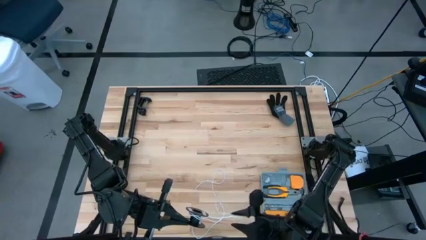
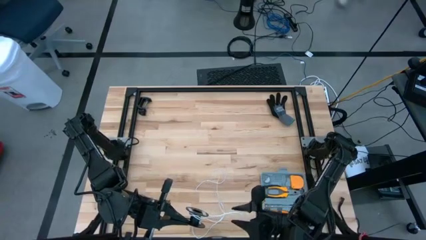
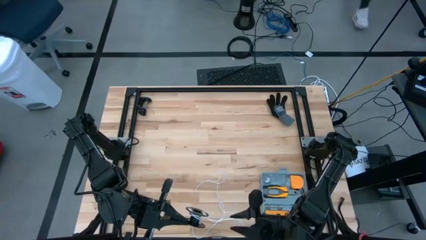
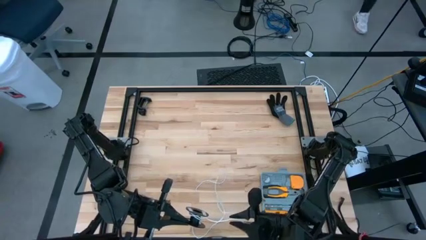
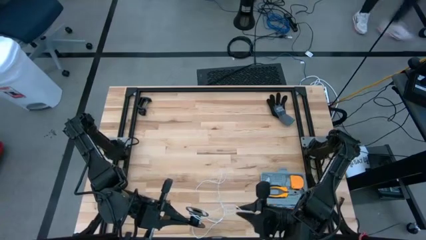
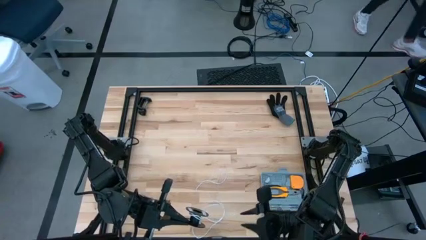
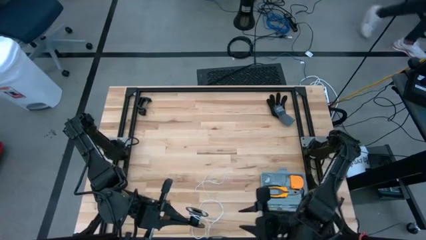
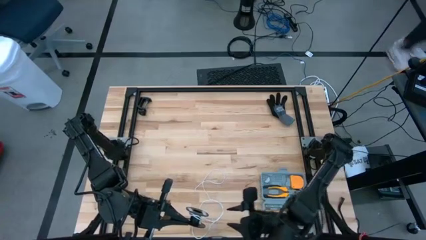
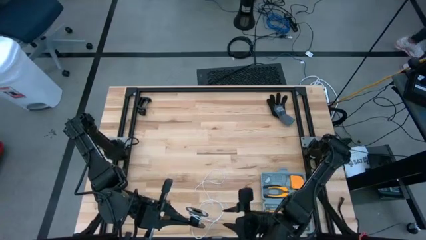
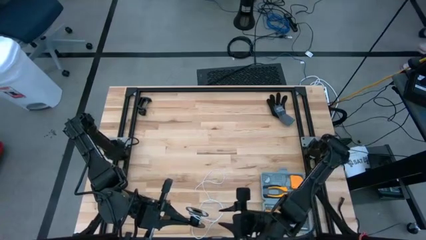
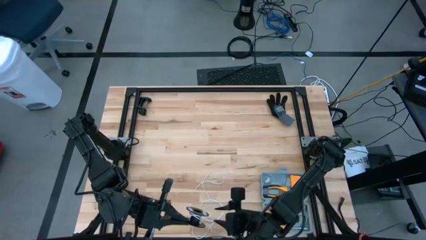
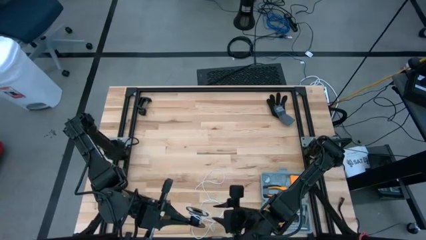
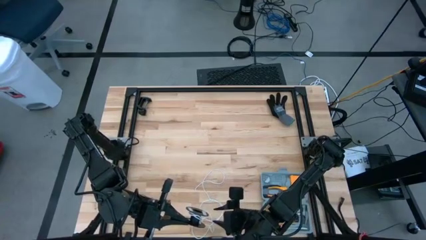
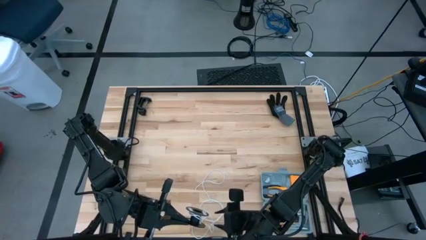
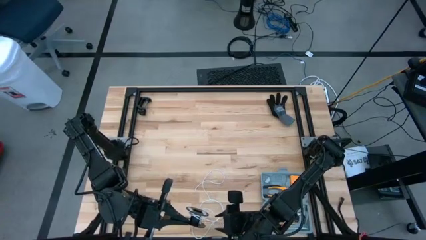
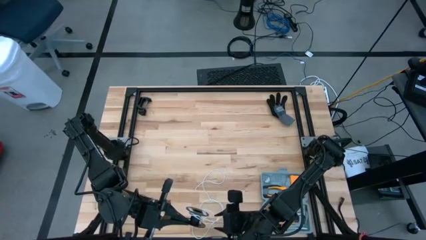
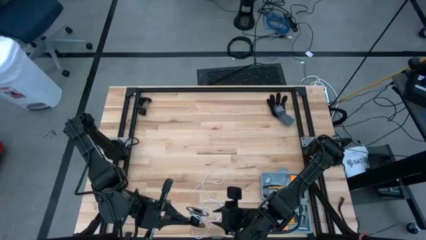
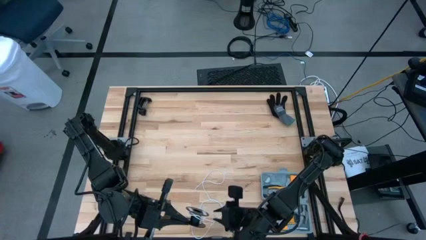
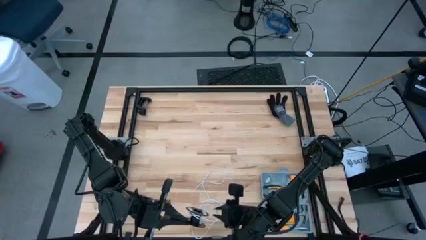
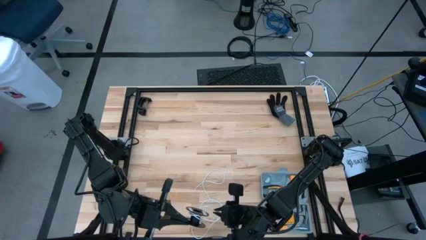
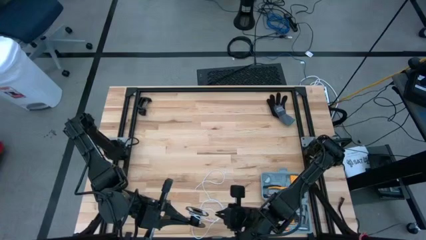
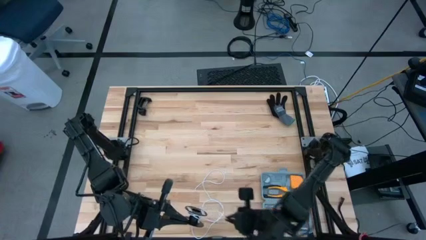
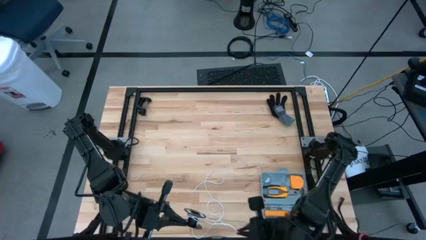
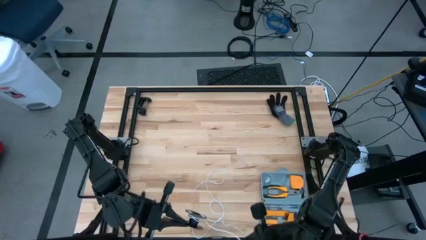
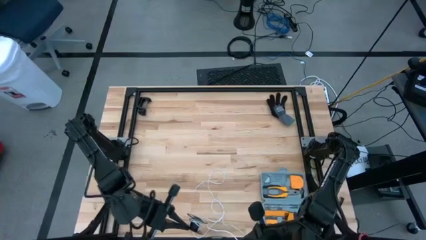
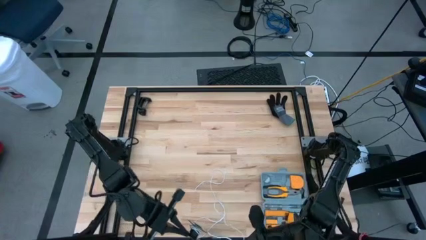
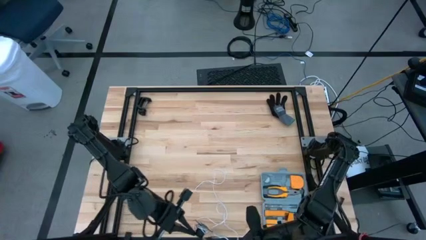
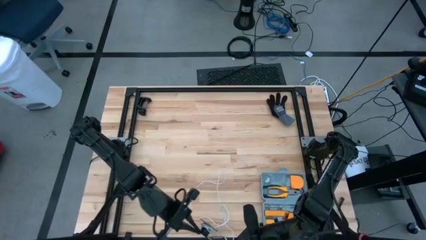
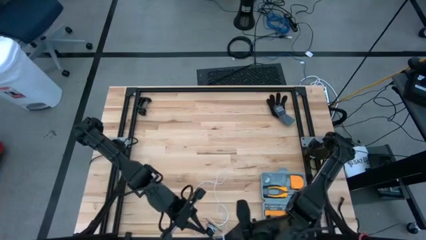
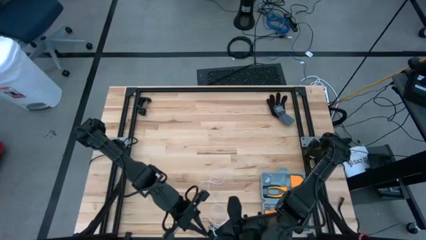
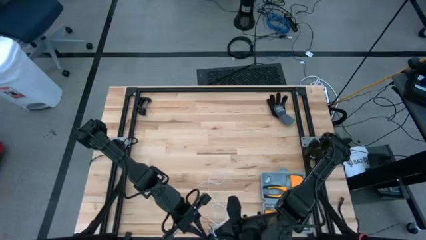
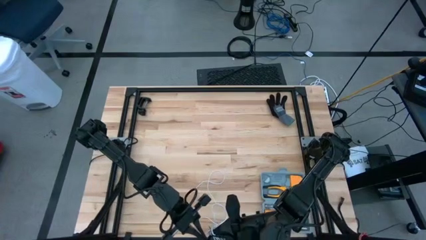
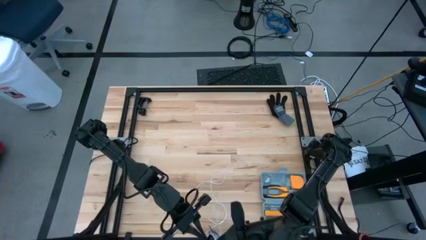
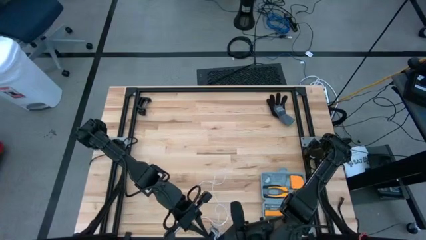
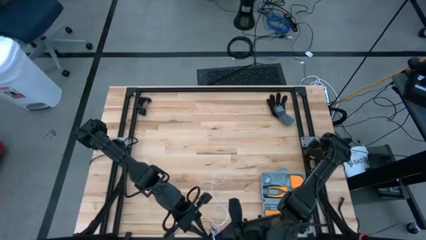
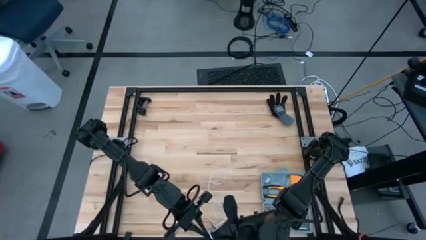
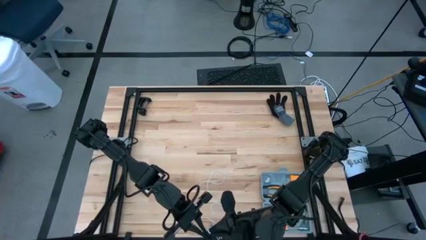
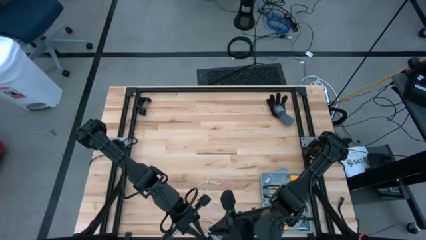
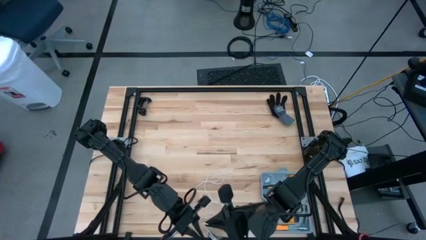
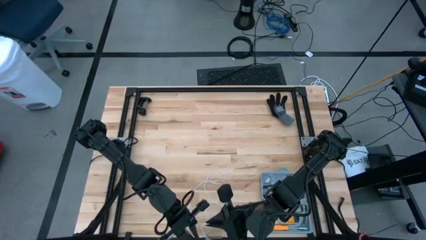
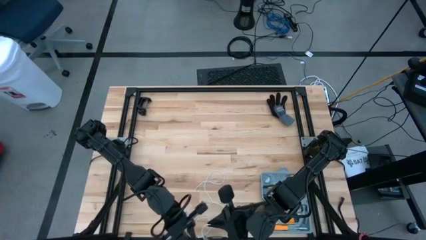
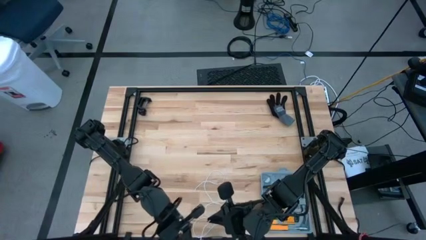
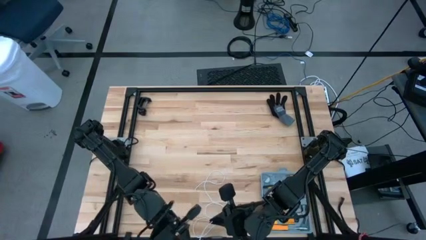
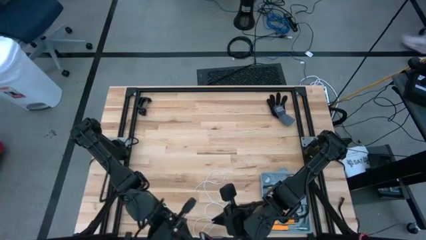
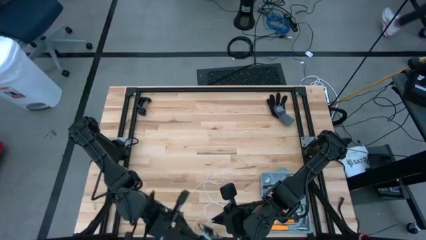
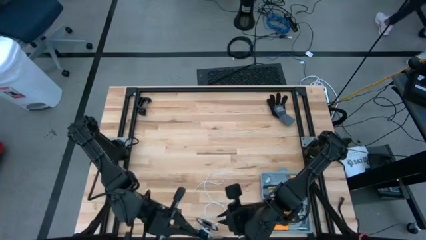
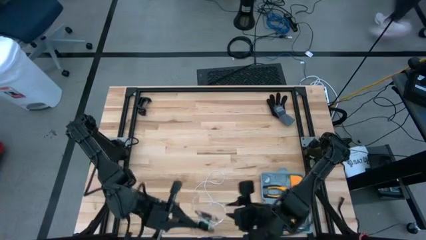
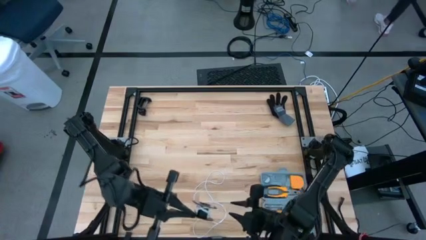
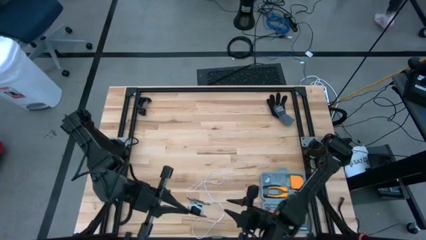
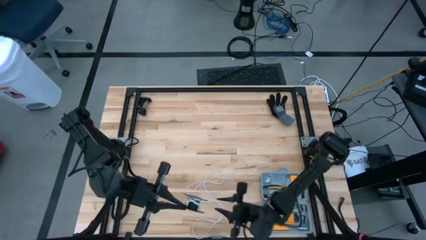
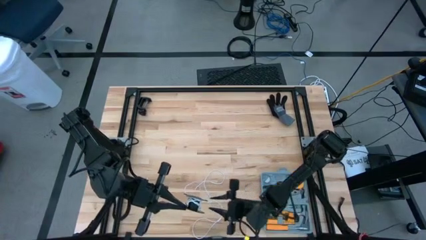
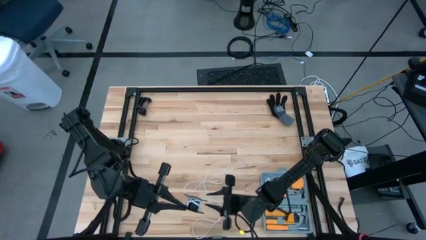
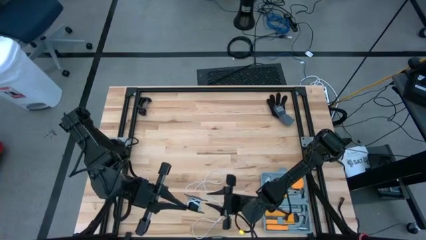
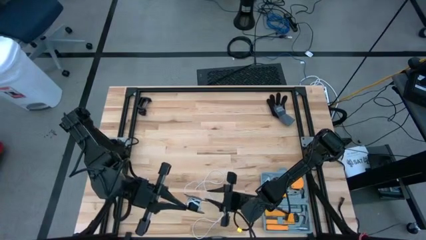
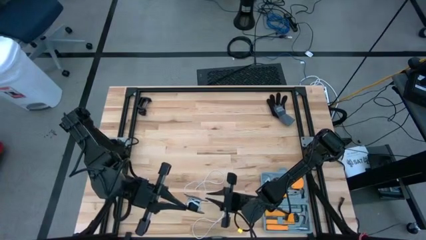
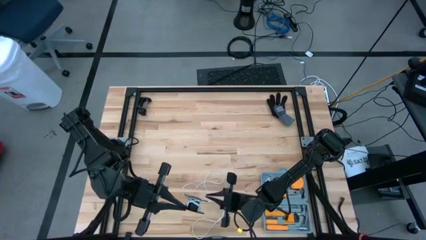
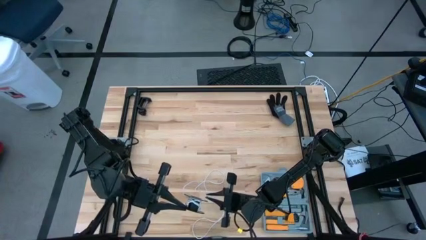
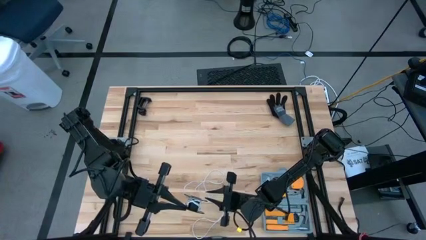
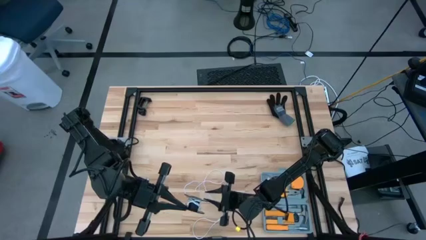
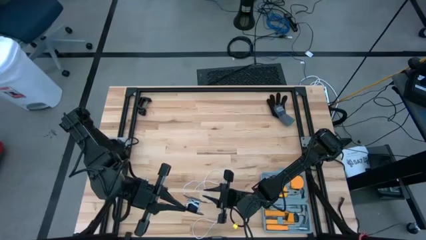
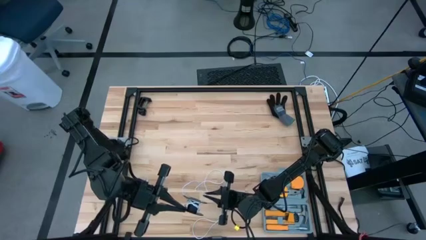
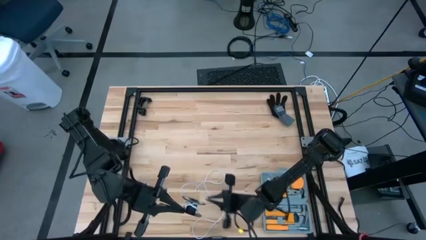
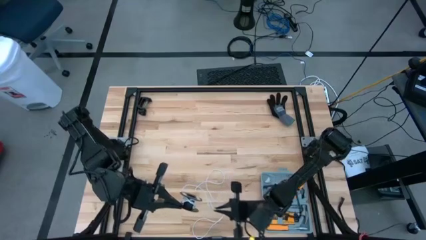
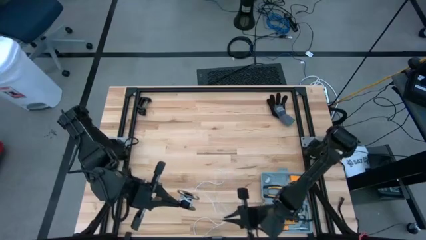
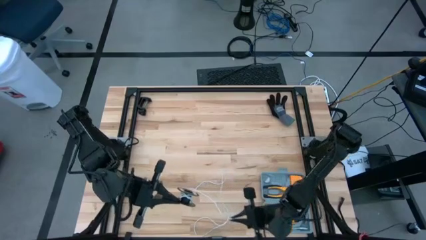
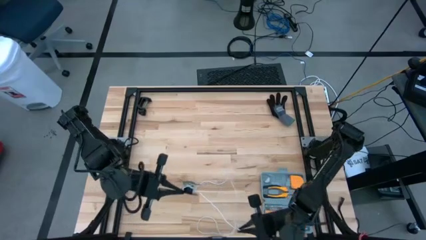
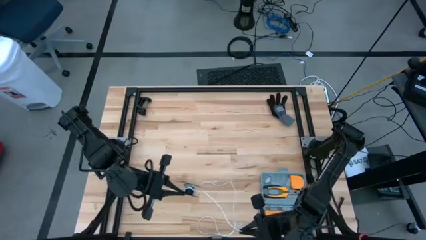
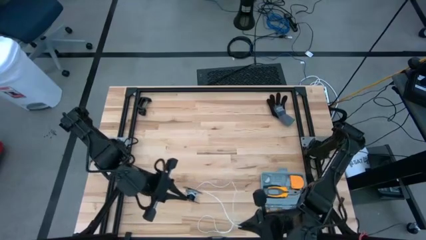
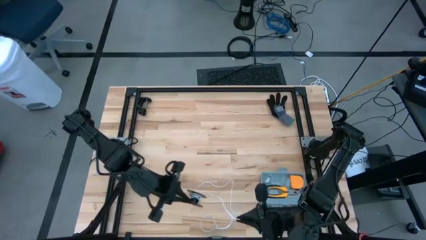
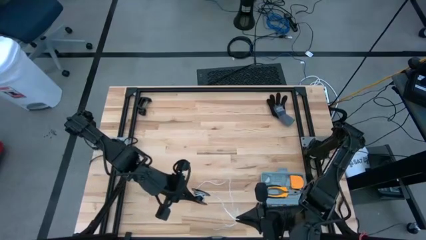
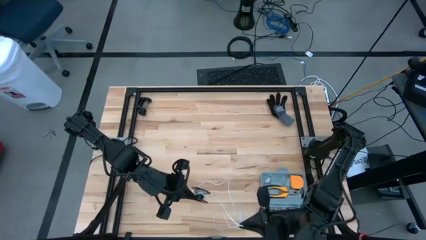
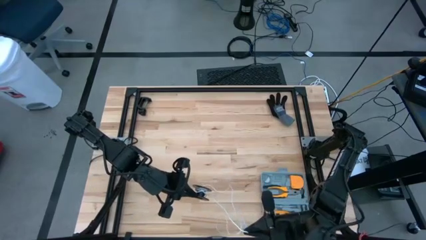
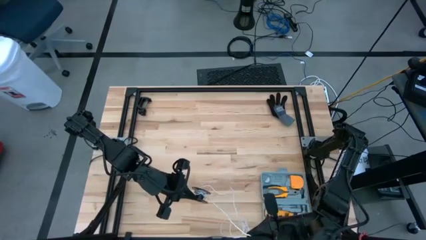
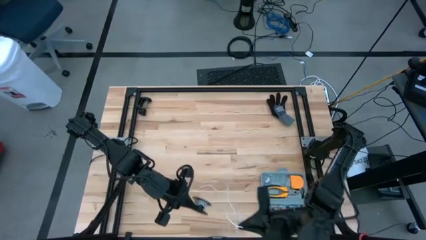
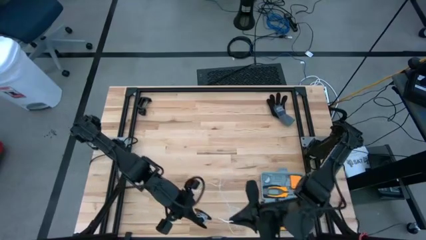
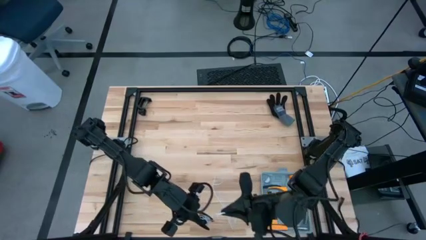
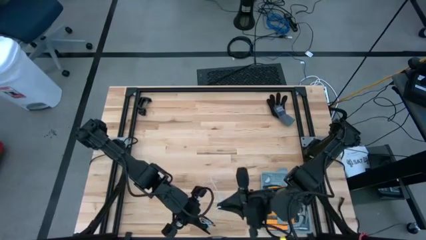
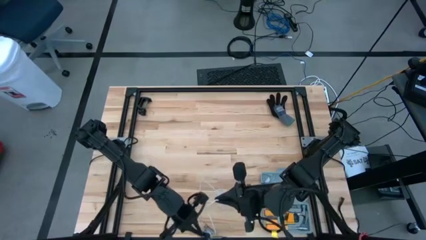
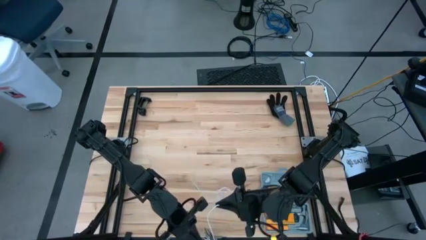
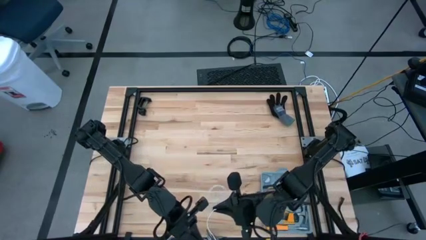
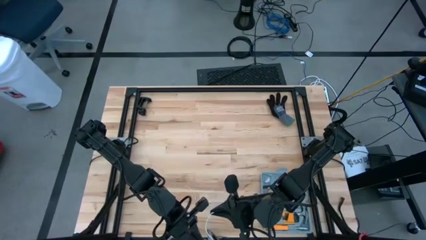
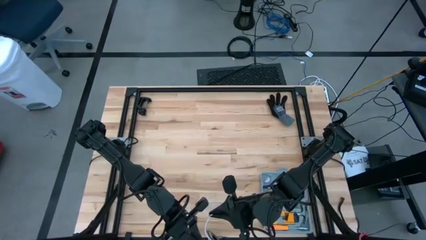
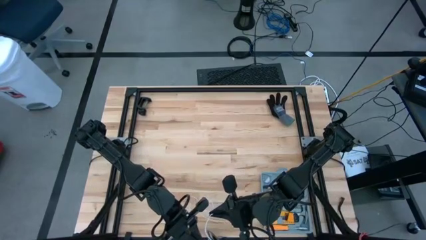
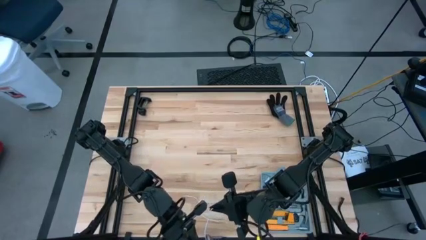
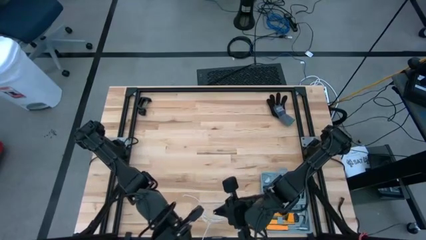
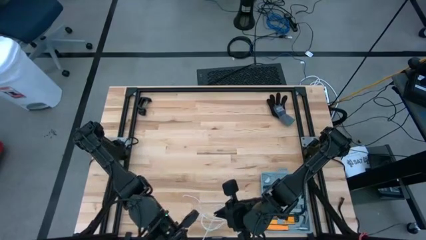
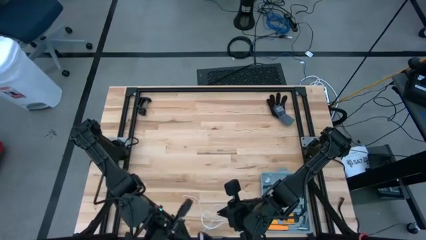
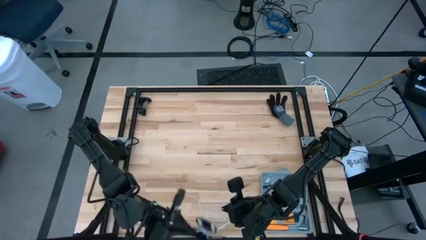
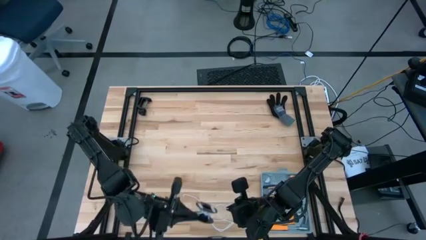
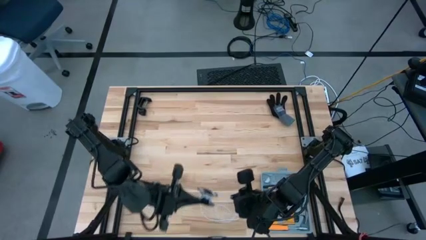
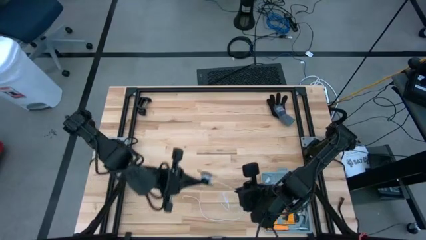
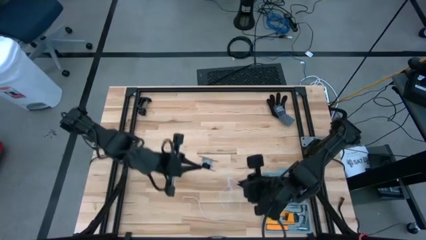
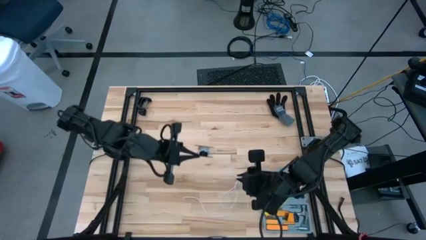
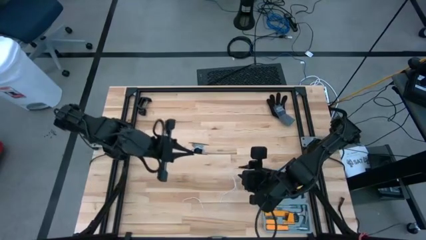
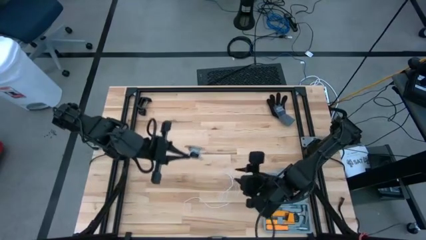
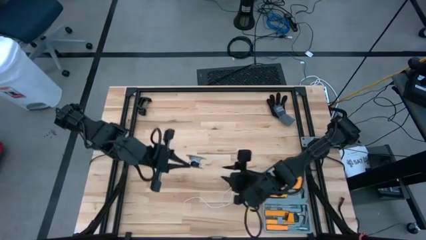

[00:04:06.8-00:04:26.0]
Task: Coil cords
Coil the white cable wire onto the spool
